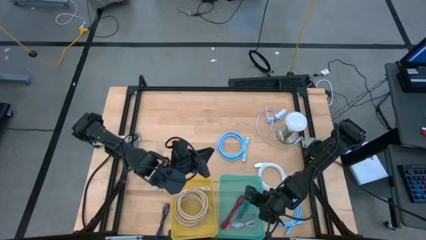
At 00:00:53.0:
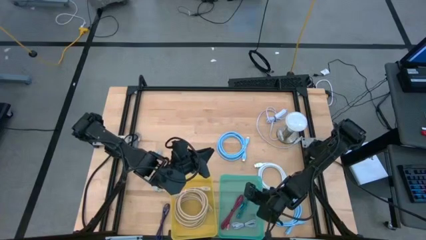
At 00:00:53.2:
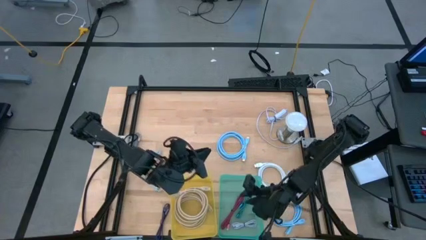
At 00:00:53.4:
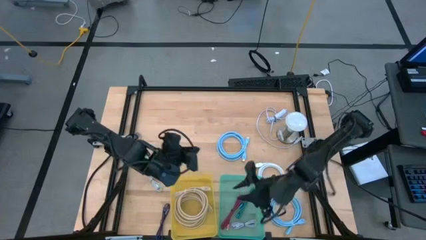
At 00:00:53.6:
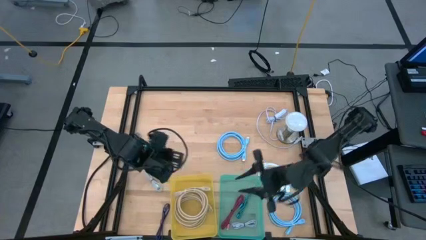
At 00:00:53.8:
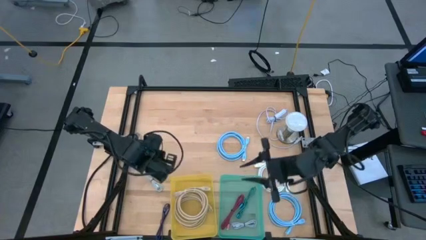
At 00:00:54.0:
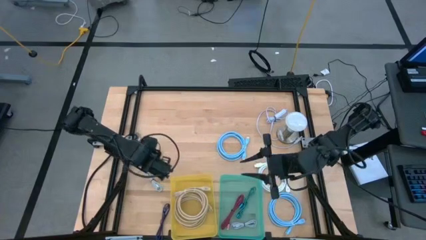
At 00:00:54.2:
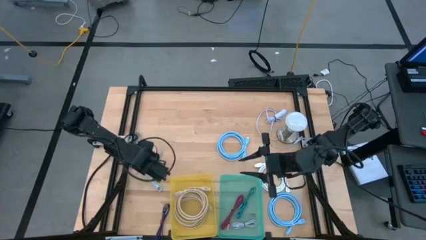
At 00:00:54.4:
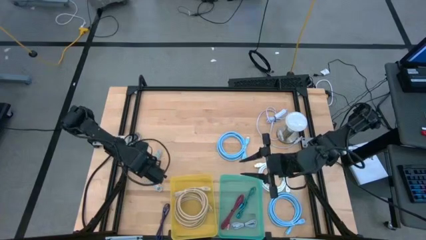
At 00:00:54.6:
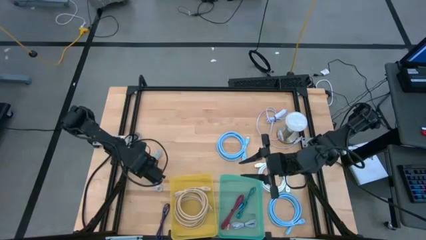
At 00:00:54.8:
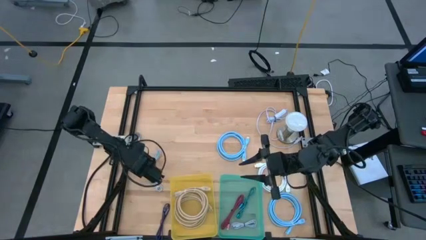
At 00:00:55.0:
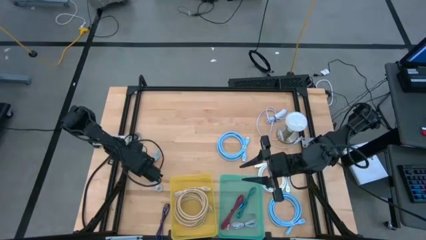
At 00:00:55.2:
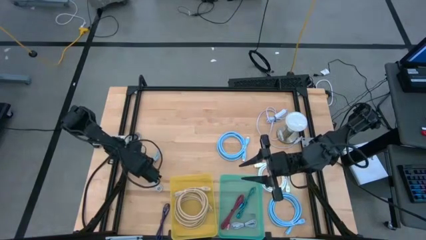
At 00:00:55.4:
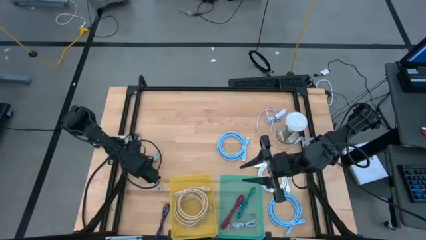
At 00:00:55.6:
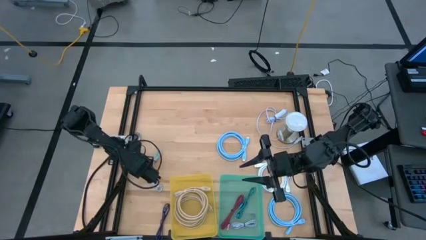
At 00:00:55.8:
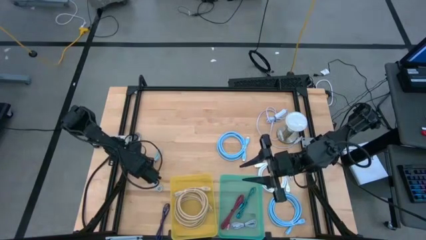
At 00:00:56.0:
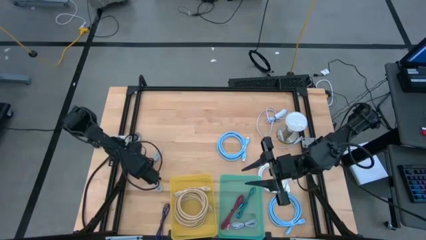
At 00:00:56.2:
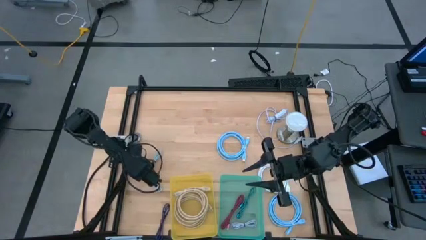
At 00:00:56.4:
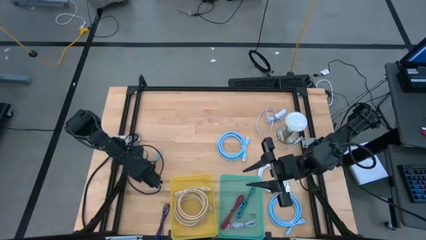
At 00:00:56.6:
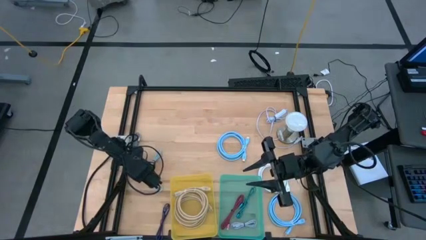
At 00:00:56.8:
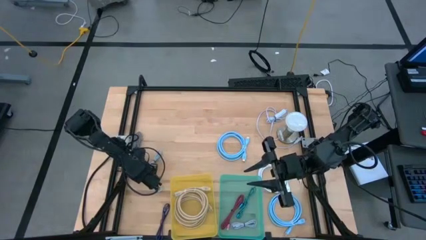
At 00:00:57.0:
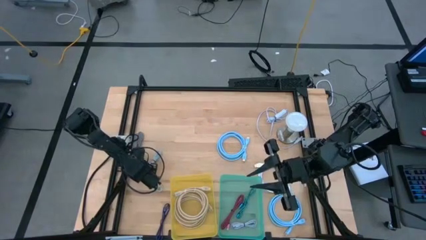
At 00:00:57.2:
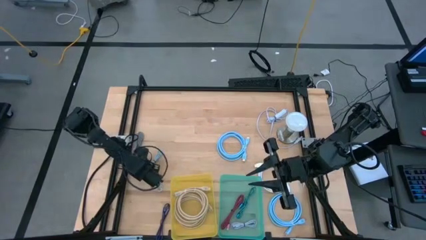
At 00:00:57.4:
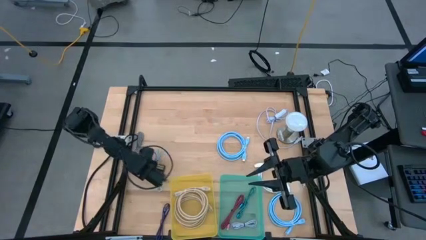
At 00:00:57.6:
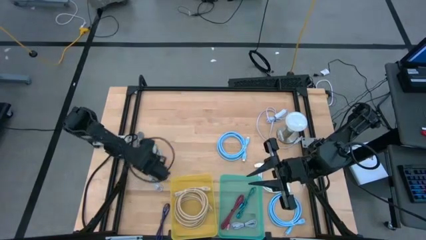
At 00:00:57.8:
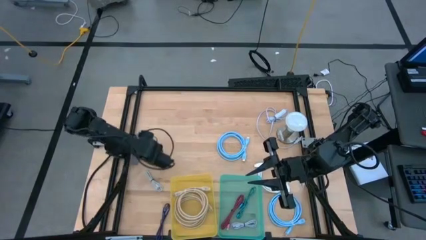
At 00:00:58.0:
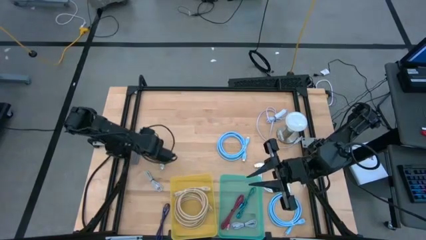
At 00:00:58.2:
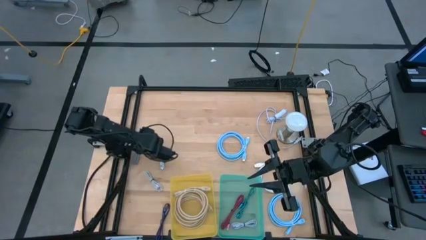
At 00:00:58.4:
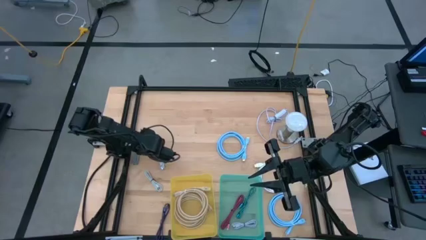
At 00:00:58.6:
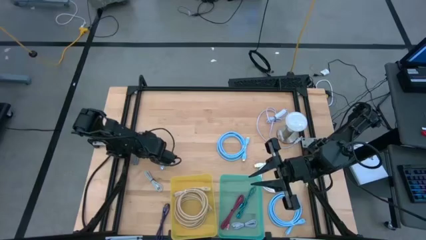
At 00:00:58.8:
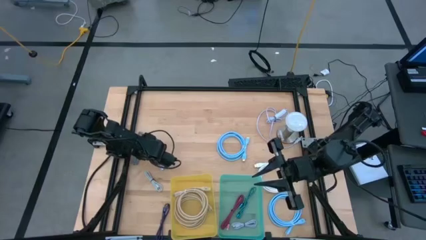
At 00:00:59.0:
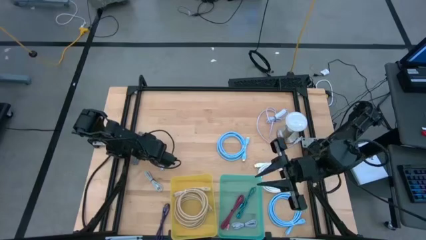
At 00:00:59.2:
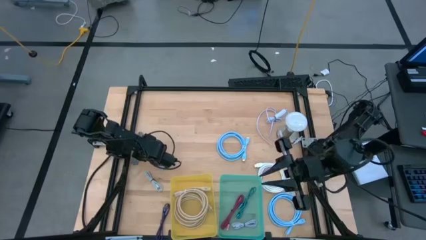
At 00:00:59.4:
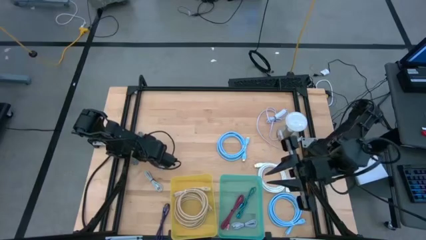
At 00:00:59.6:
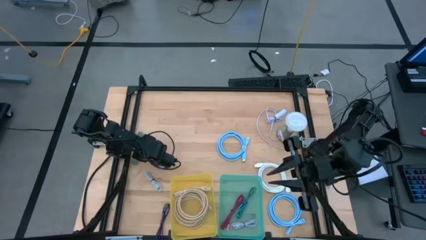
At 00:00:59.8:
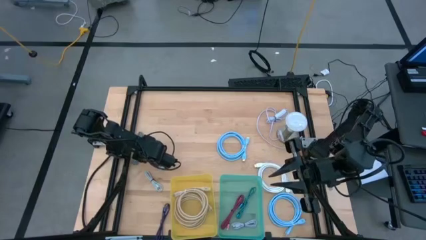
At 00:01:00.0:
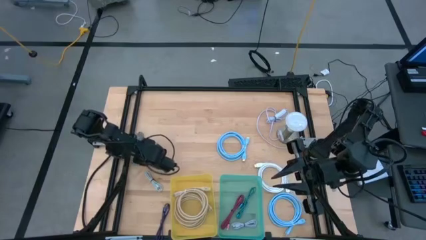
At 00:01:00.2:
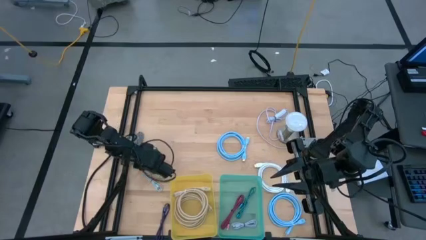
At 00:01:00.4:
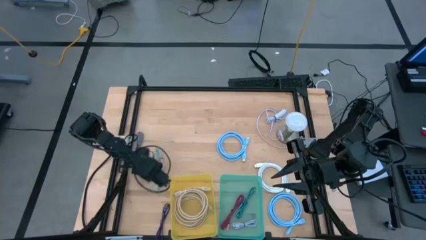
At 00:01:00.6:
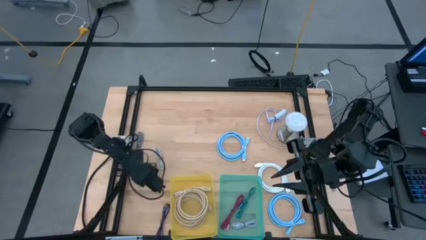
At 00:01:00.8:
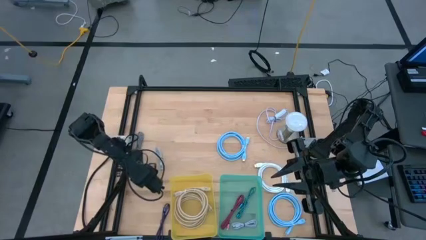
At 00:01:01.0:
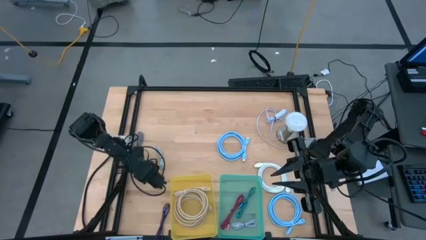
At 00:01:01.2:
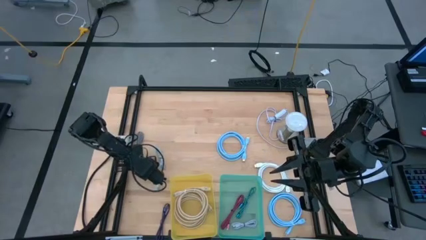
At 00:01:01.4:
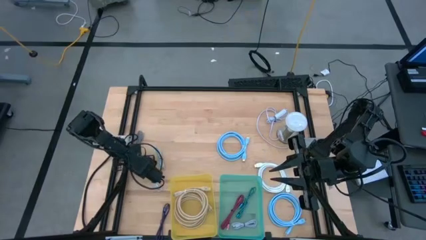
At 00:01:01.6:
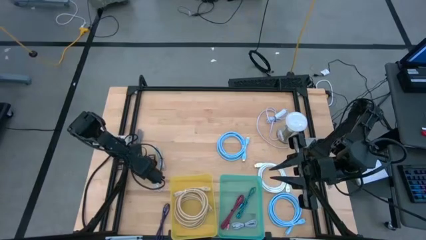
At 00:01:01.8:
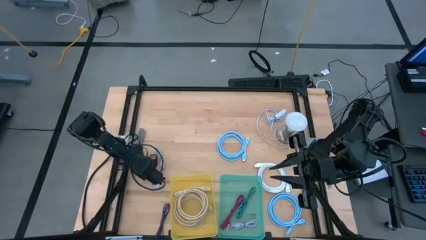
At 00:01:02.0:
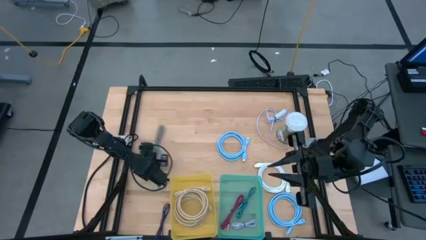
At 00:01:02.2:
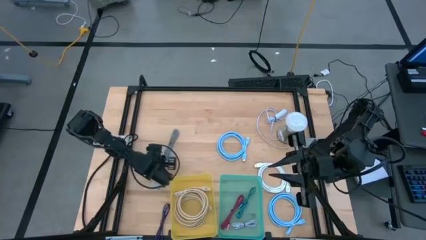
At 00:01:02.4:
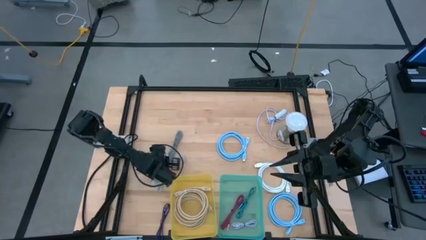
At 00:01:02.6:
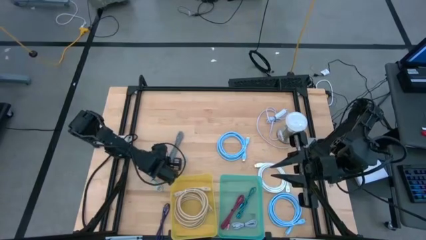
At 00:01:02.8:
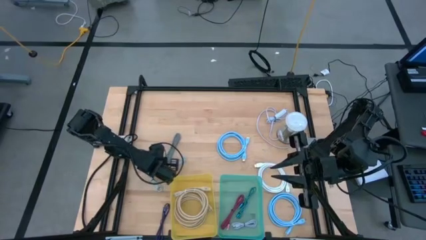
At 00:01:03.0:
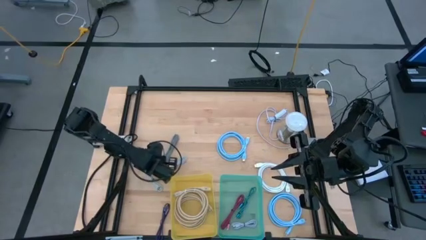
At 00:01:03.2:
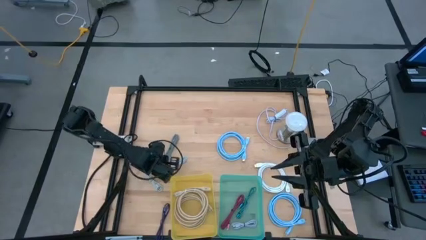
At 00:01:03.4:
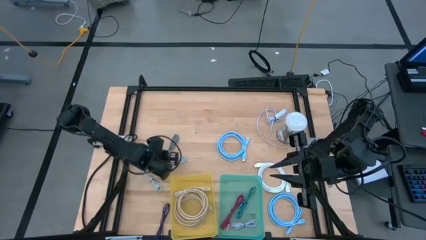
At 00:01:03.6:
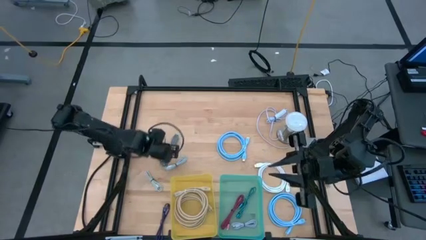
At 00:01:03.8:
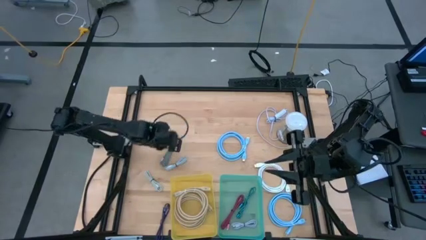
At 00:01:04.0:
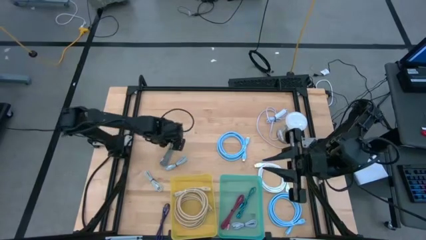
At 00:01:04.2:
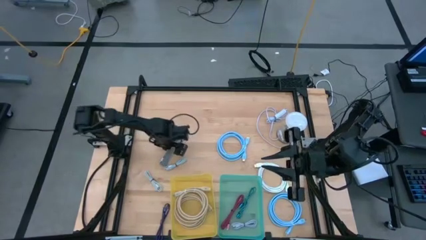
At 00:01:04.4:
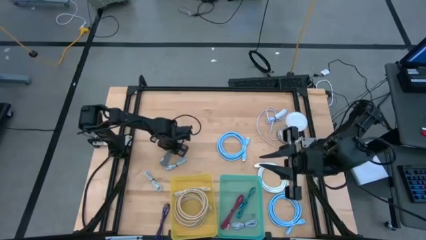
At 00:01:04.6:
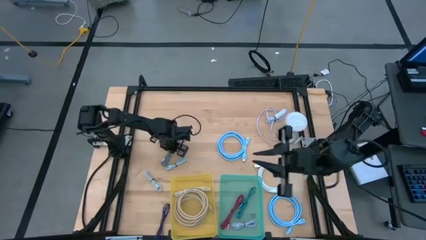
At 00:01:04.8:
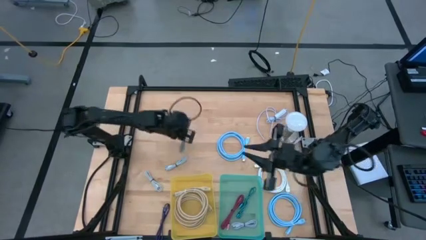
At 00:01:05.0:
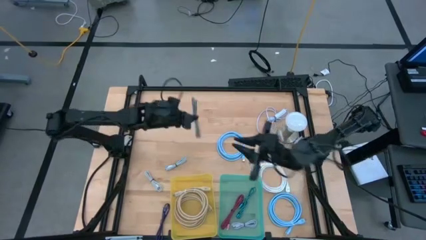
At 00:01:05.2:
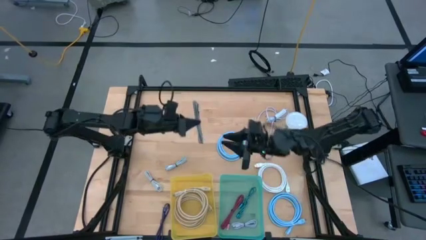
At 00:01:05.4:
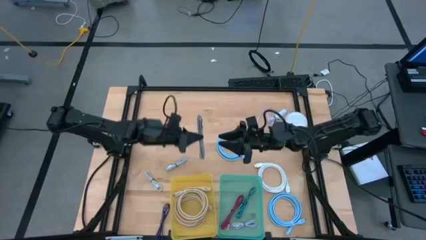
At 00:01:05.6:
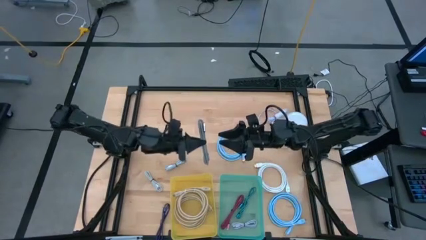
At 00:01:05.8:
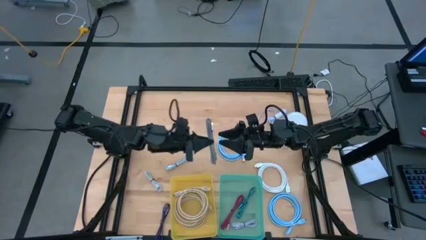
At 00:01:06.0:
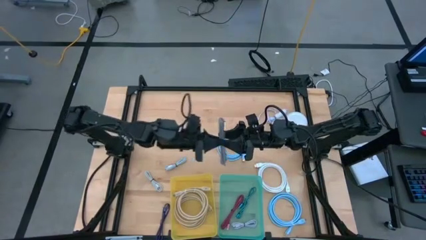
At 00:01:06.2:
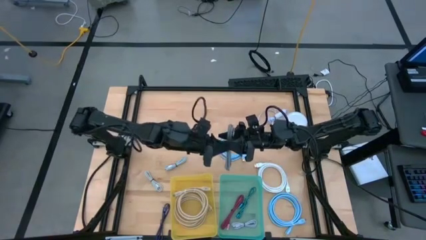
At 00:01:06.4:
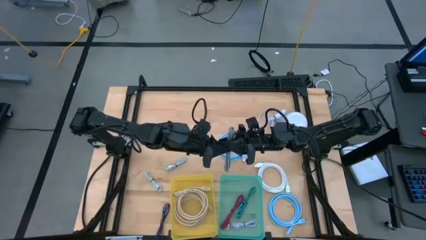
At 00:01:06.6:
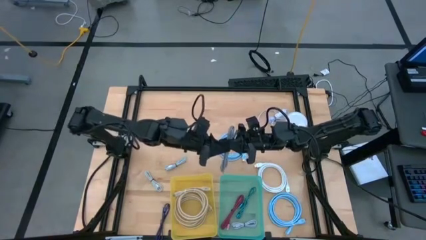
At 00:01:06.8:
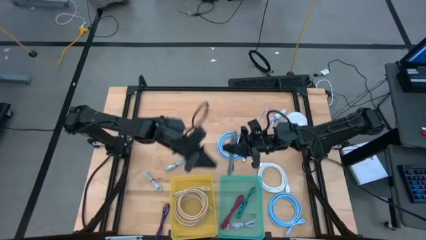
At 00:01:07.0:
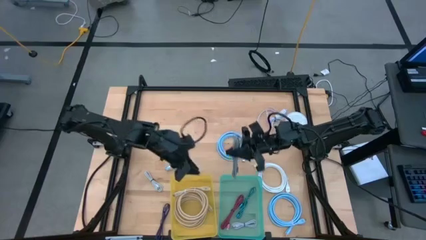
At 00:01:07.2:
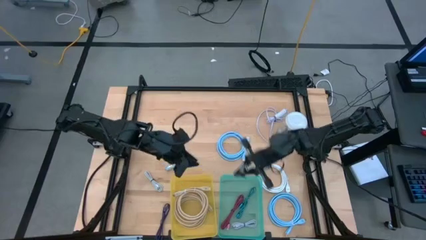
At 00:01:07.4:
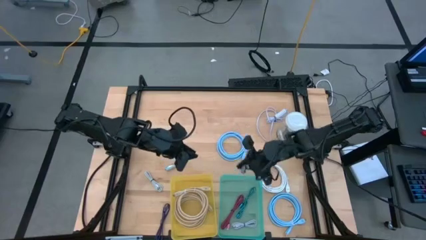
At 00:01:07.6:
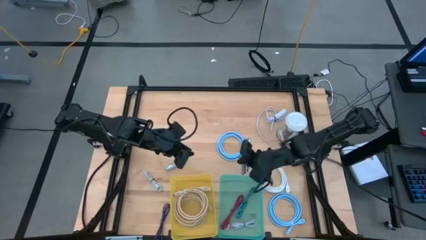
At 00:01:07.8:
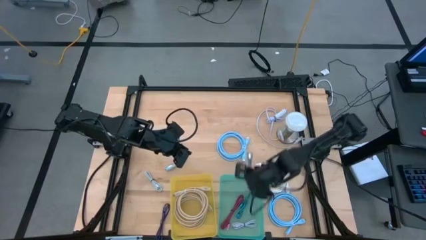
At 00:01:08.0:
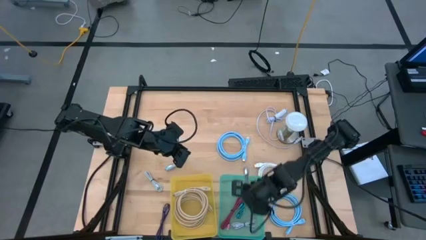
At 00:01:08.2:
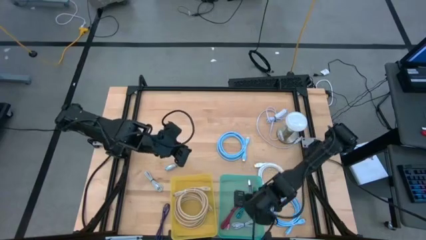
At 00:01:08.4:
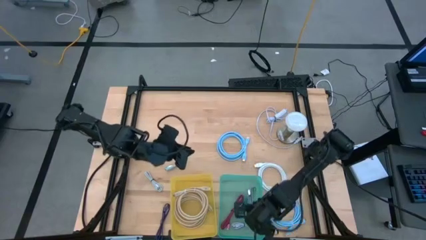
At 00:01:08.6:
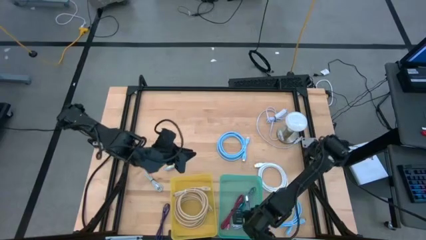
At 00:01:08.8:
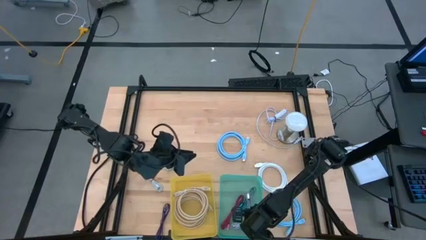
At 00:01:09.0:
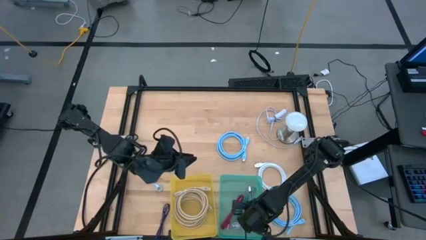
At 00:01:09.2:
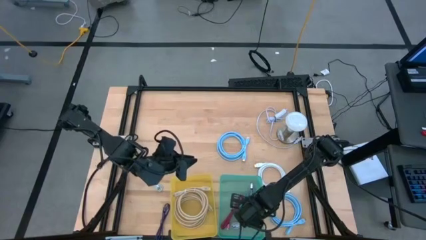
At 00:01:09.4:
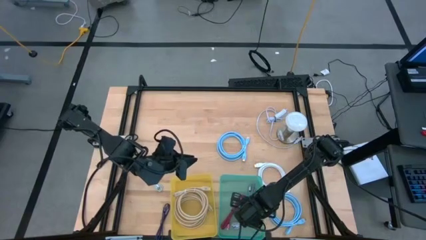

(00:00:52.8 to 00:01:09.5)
Task: Pick & Place USB Port
Put the small black striped charger cable into the green bin
